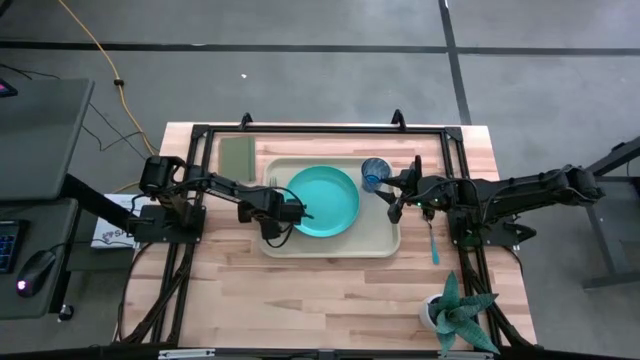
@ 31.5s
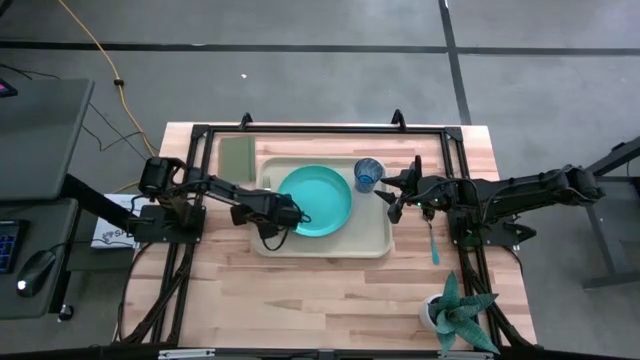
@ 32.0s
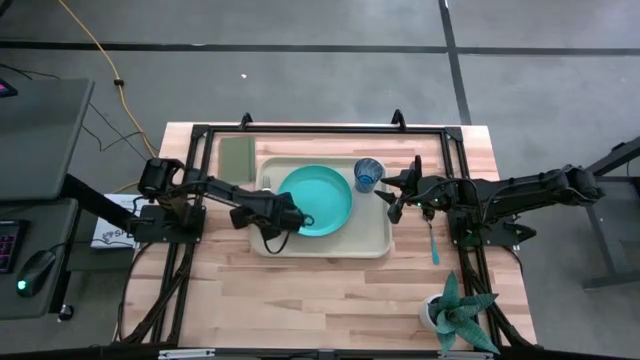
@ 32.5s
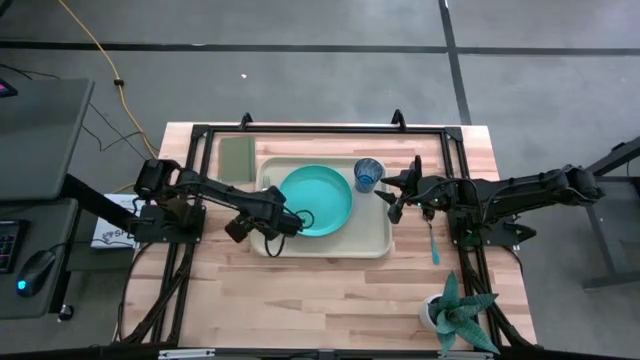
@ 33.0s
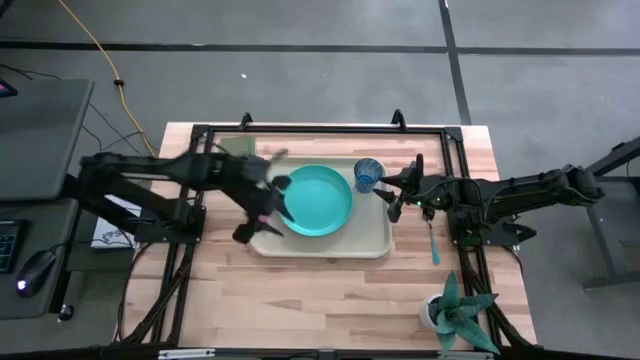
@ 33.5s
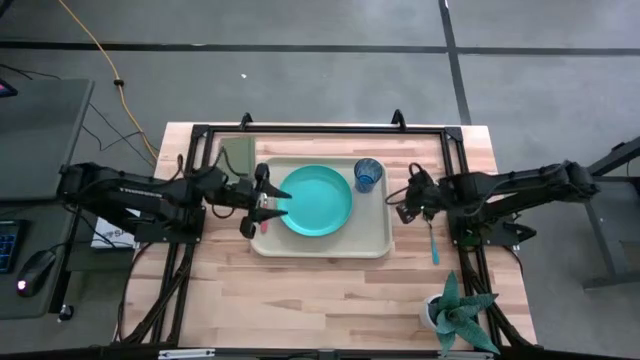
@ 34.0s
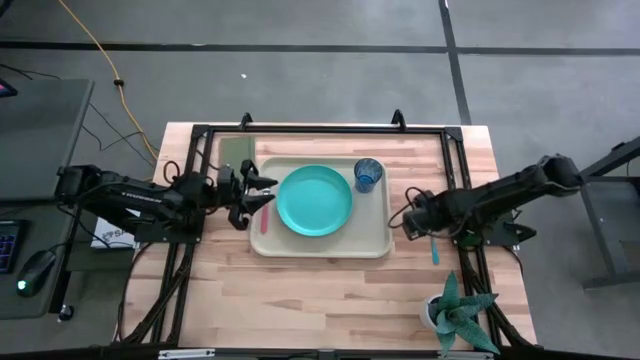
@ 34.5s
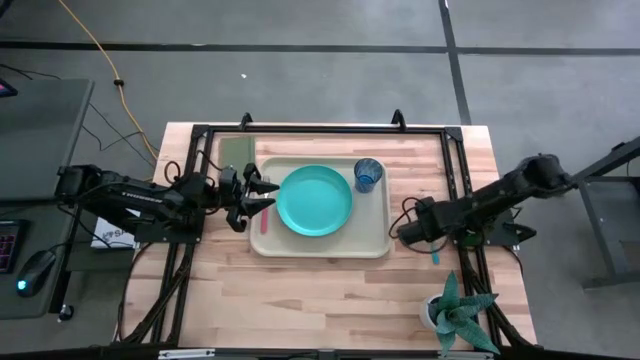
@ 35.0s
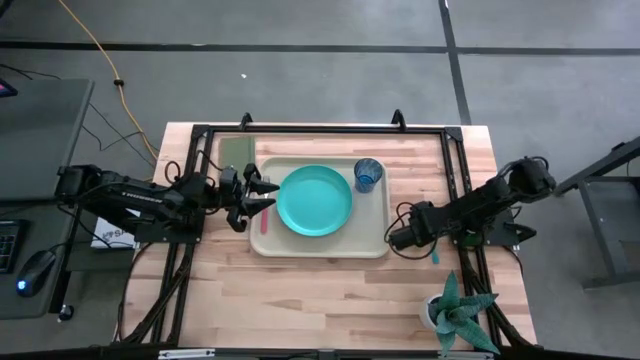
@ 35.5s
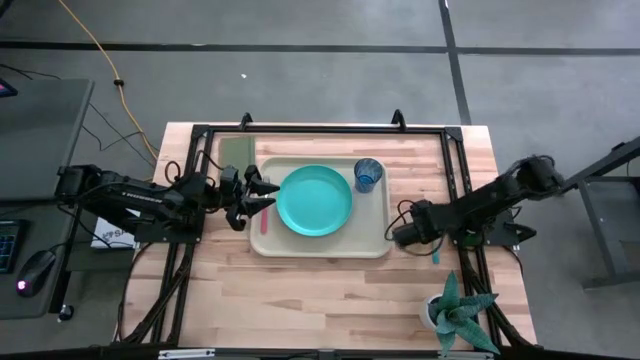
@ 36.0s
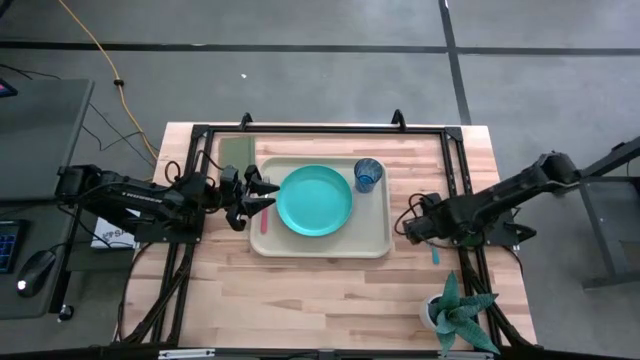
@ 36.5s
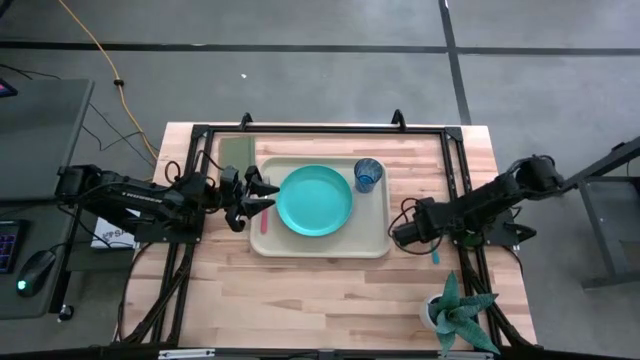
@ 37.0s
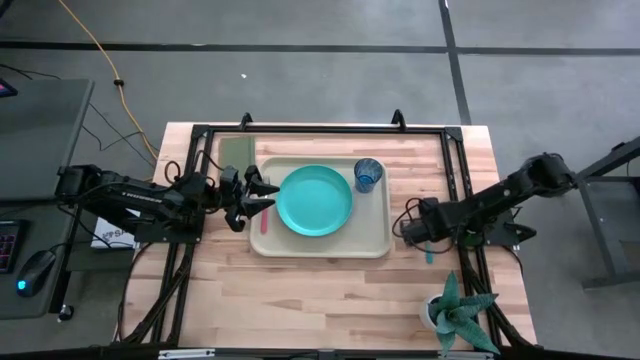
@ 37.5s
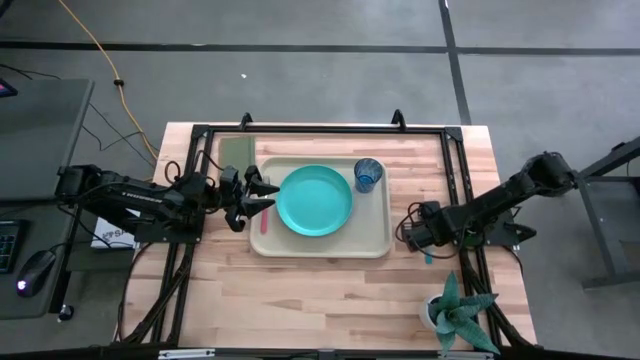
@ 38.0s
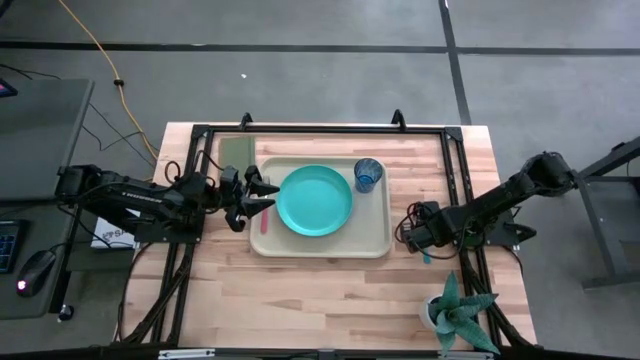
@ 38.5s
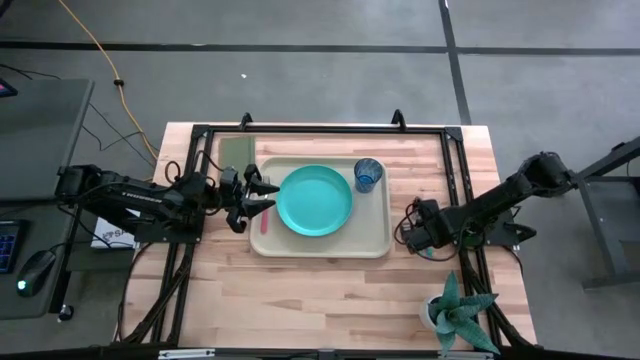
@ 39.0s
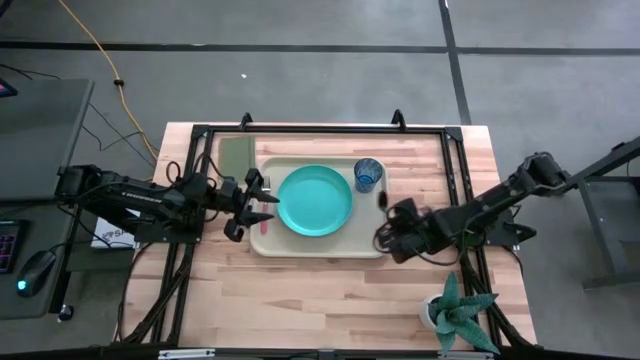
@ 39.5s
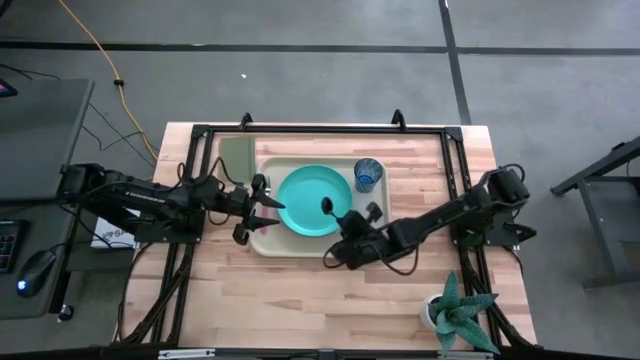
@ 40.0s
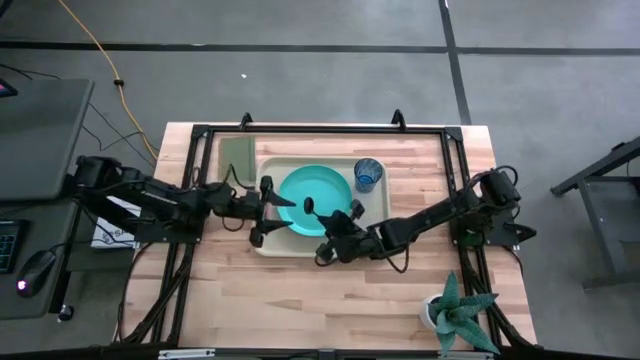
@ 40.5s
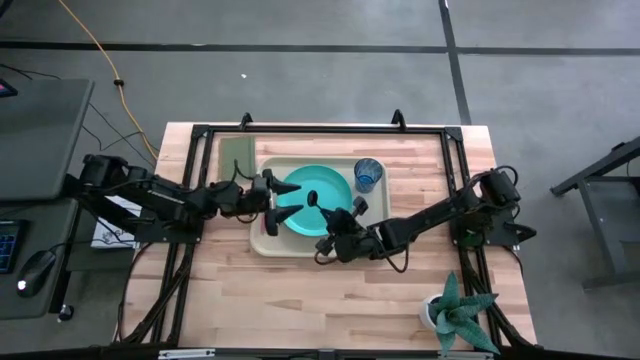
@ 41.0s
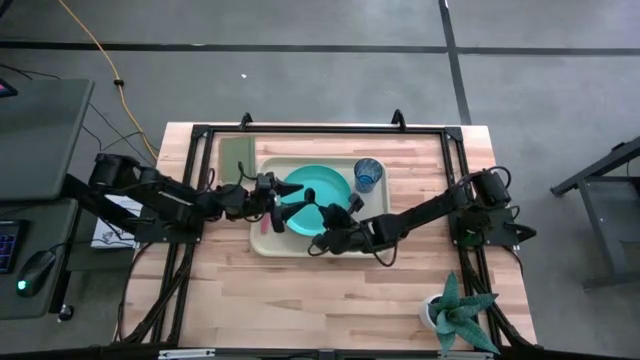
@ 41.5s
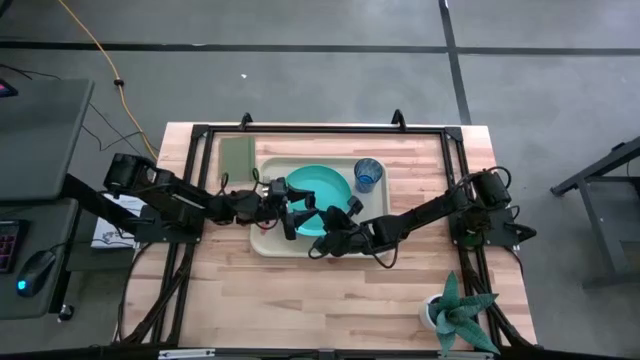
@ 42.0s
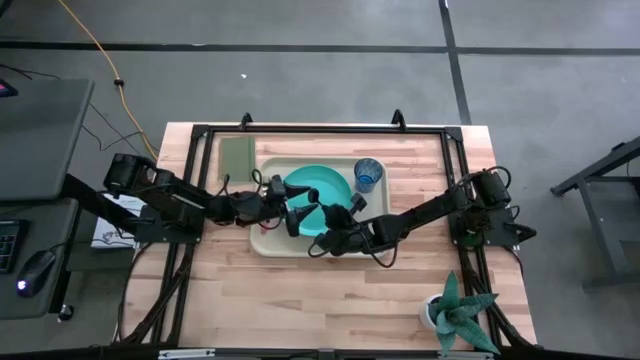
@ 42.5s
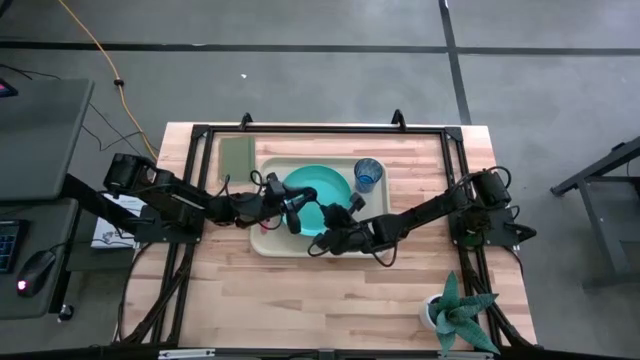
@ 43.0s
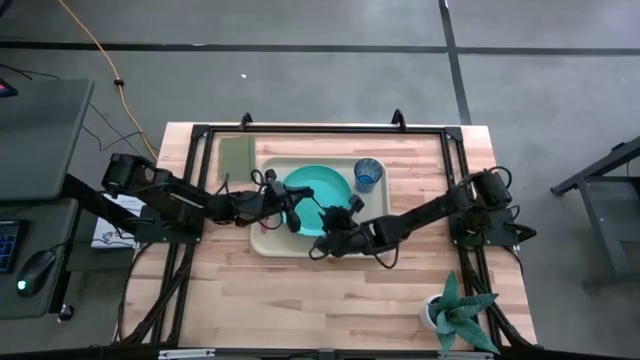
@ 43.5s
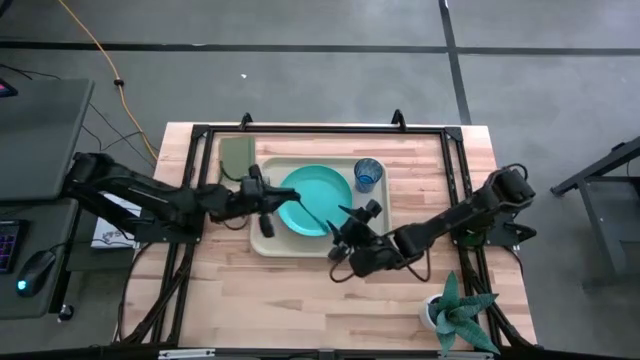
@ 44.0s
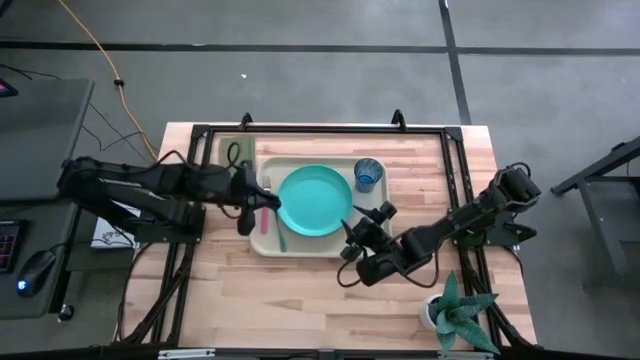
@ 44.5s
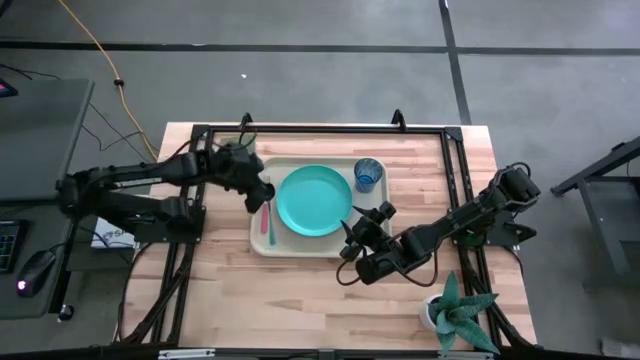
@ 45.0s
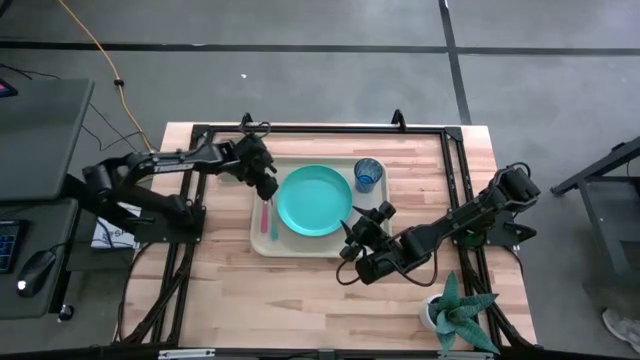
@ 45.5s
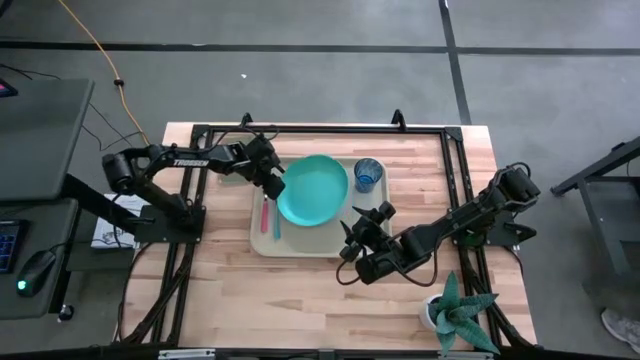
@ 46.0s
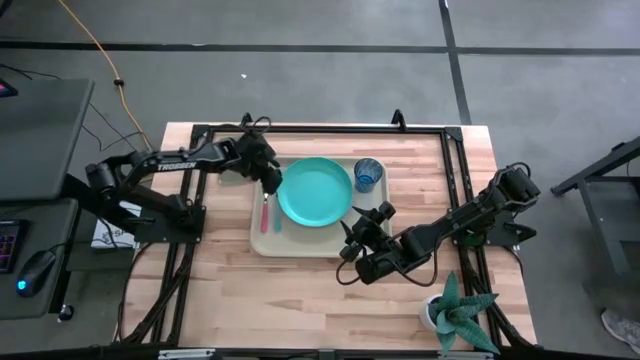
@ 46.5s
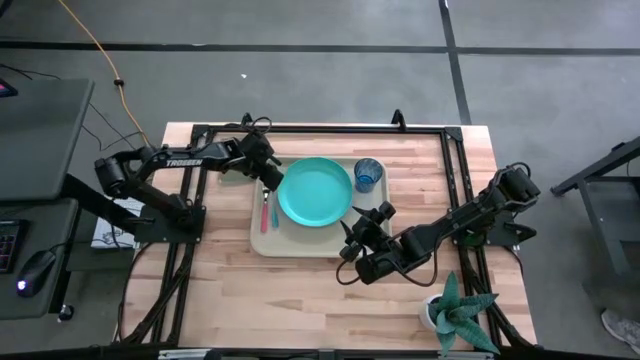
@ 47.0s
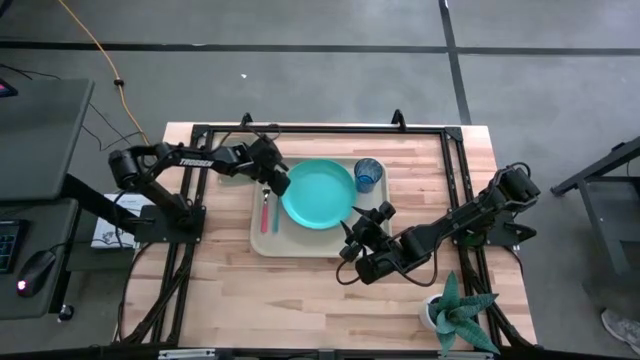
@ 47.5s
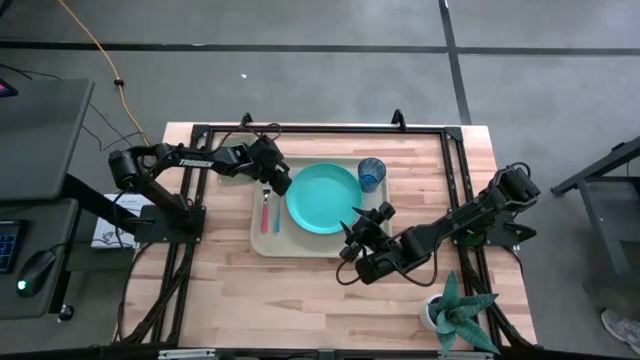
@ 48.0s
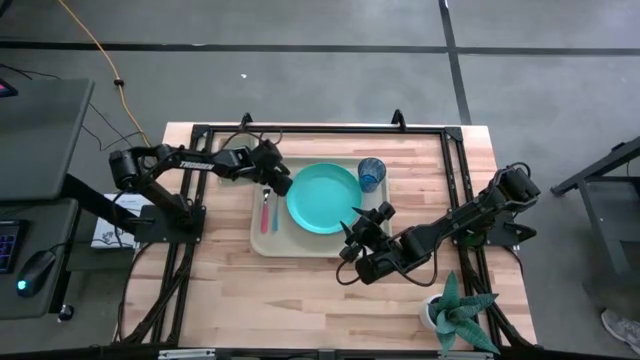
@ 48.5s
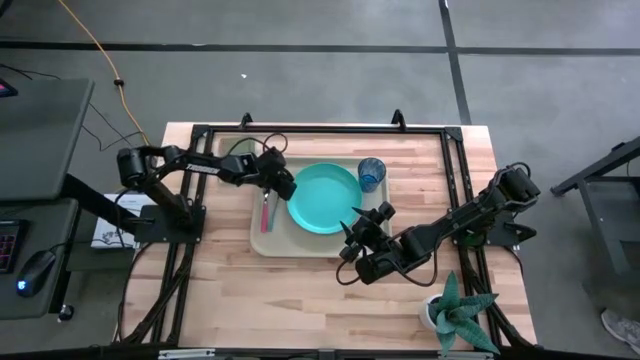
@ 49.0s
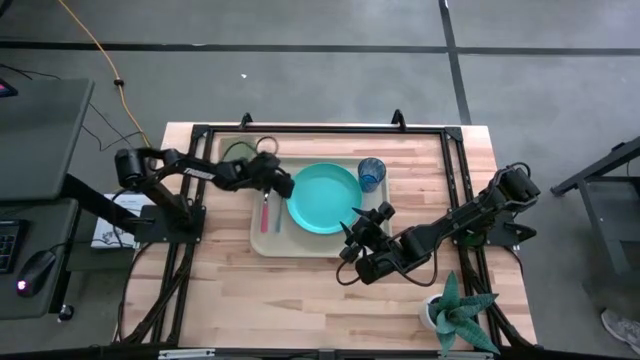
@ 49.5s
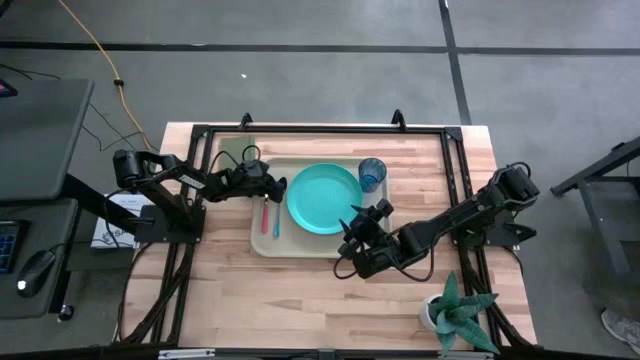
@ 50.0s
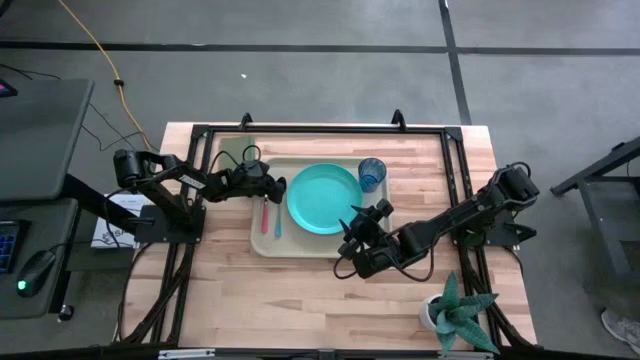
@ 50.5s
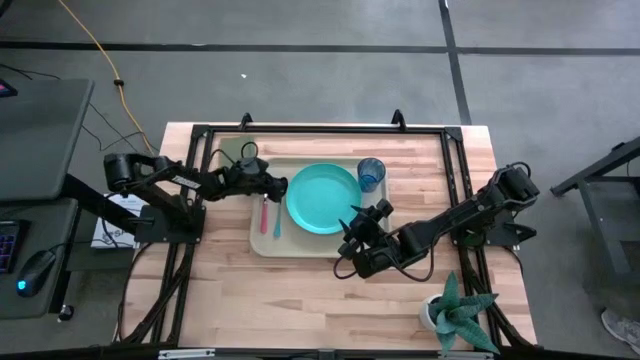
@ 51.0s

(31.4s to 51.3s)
Task: Pick and place plate/cup/fork/spoon on tray
Put the light blue spoon on the light brown serving tray at the left of the light blue plate

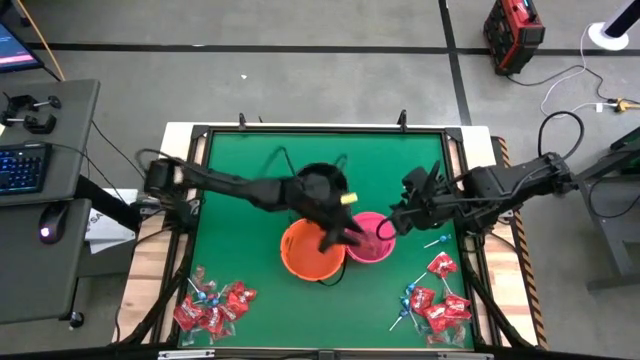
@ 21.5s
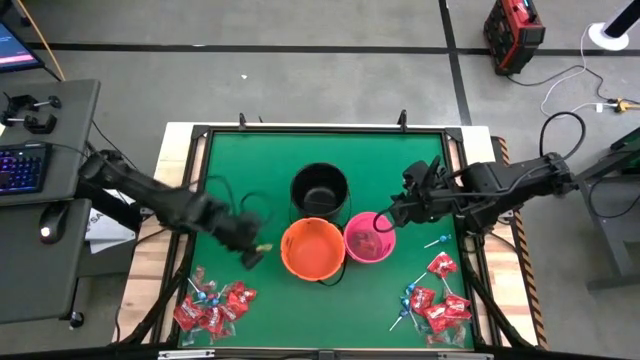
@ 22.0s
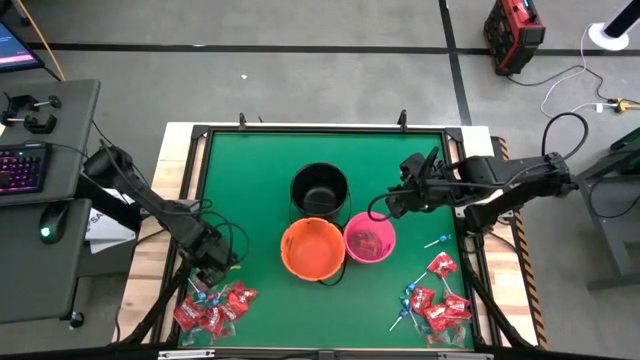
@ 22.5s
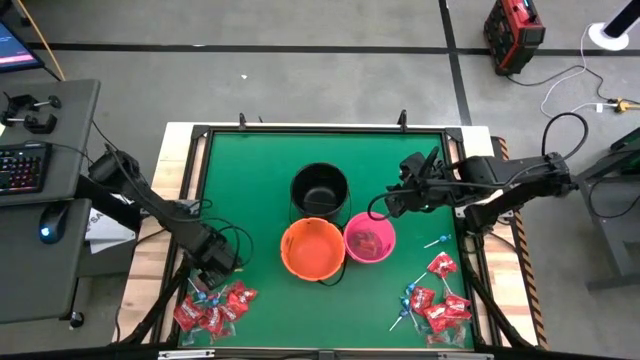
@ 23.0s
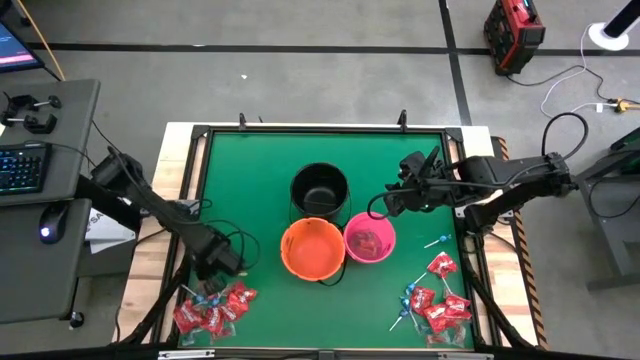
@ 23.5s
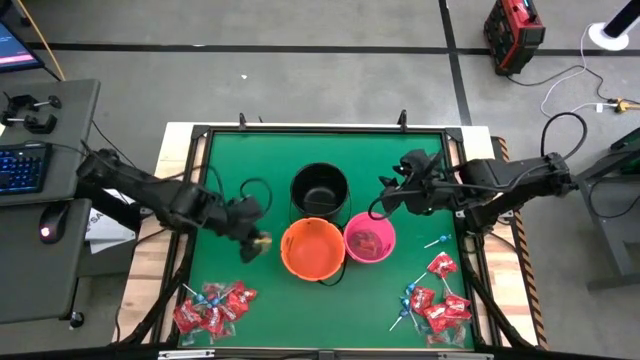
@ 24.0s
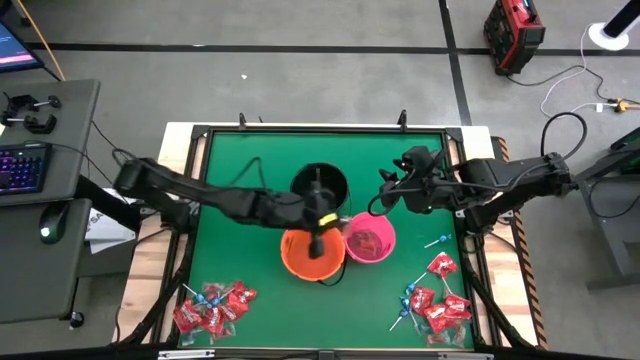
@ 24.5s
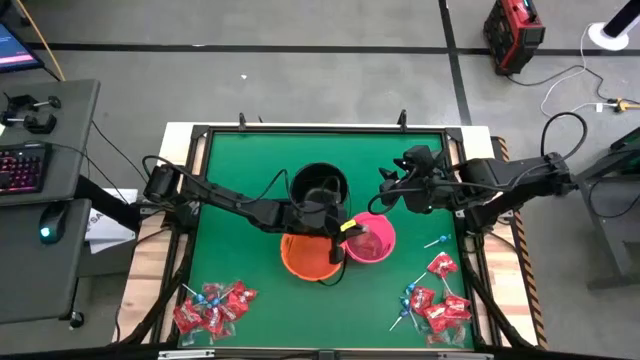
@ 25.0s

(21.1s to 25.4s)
Task: Sort candy by brand, put in halloween buckets
Put the orange gummy into the pink bucket
